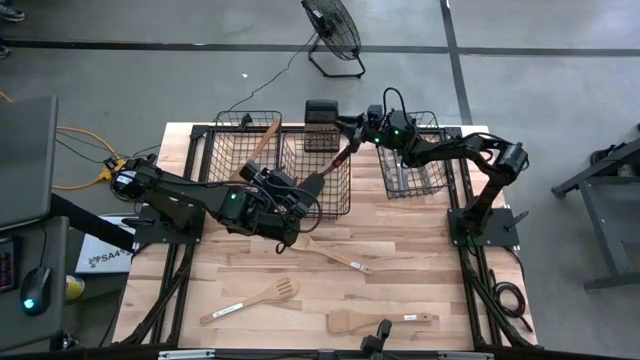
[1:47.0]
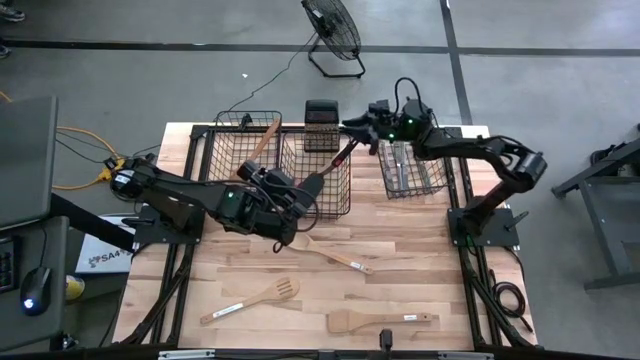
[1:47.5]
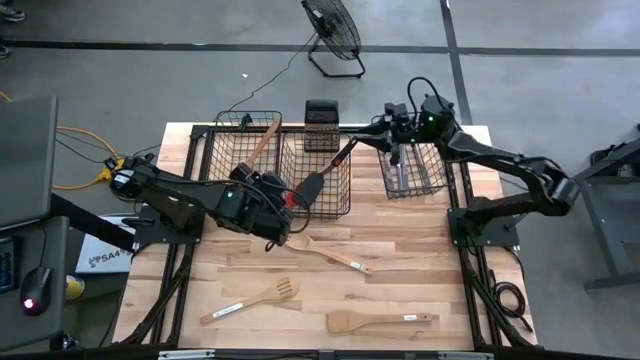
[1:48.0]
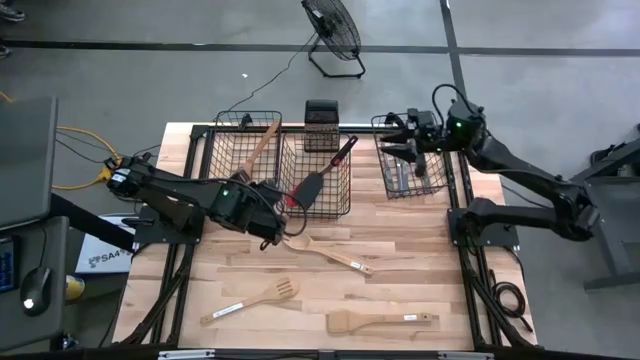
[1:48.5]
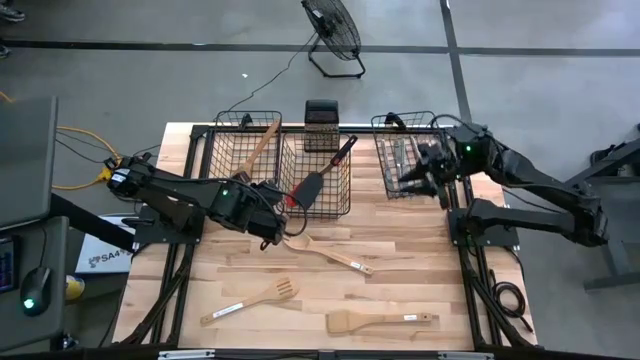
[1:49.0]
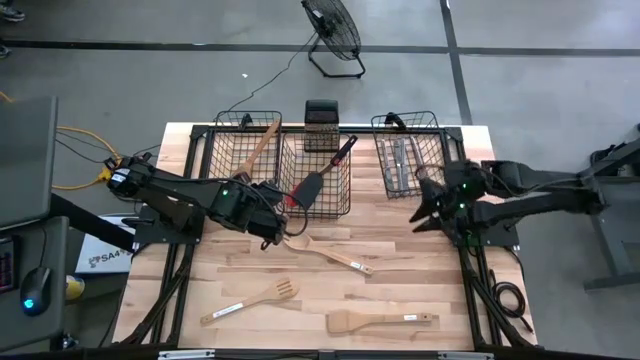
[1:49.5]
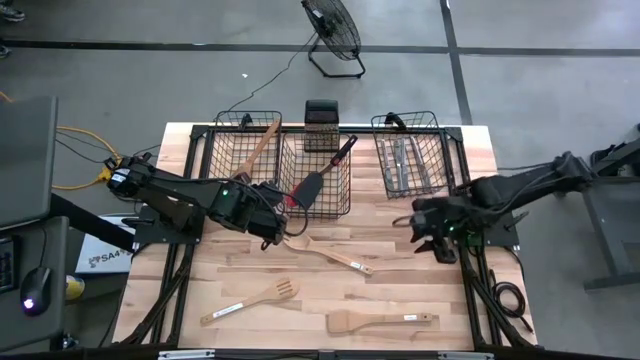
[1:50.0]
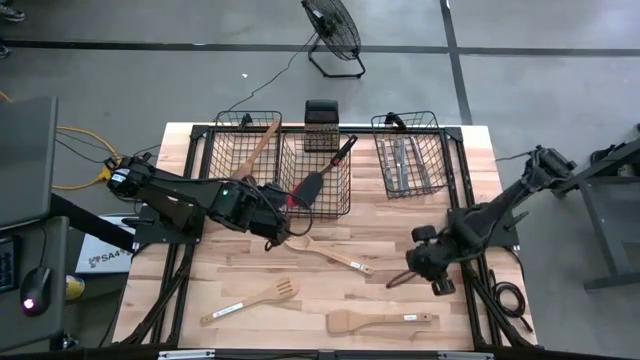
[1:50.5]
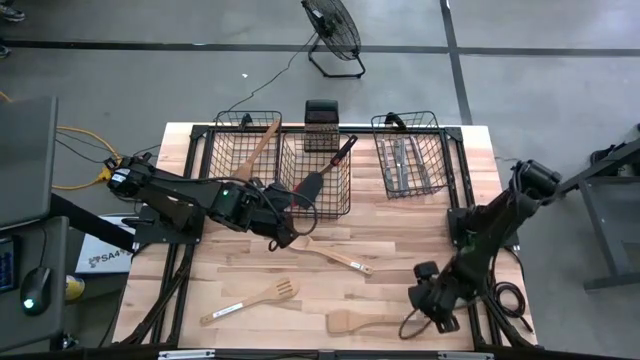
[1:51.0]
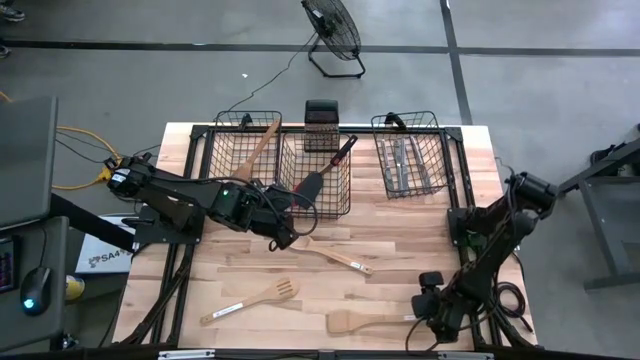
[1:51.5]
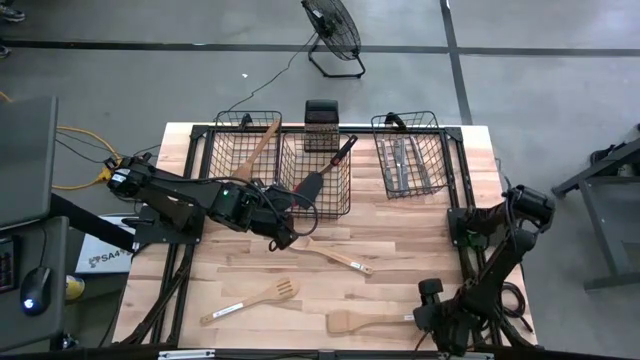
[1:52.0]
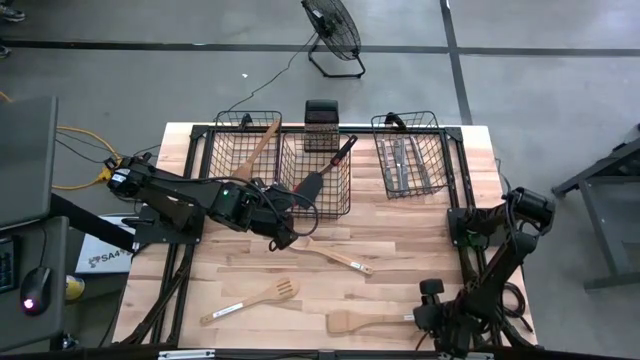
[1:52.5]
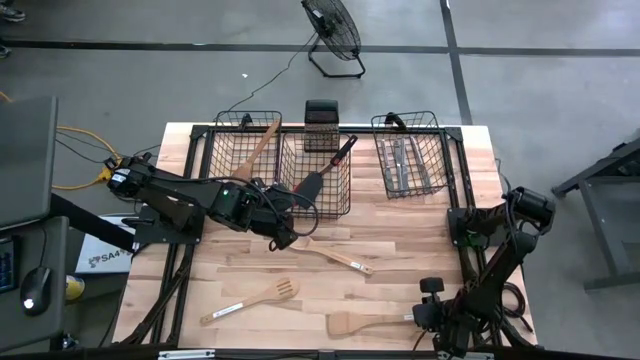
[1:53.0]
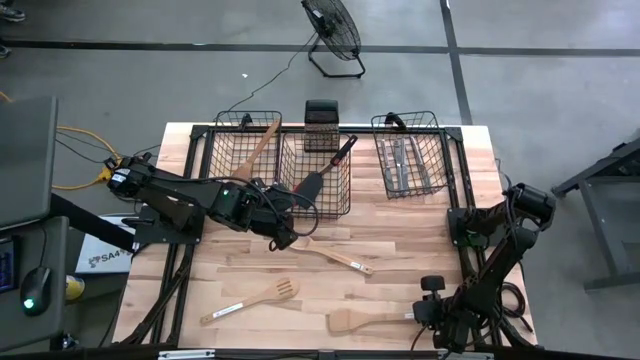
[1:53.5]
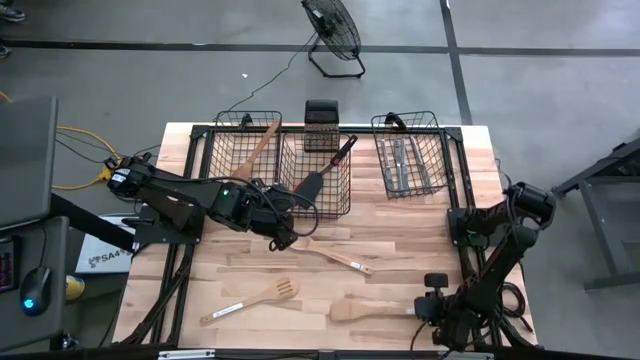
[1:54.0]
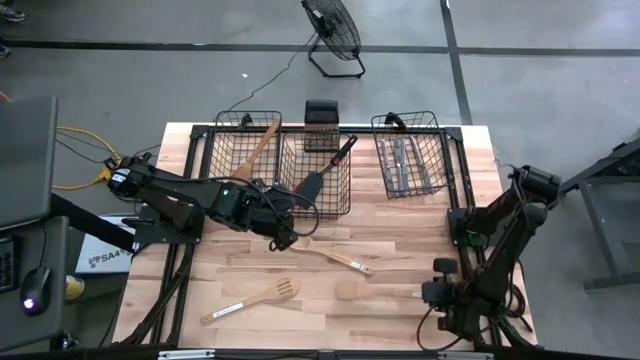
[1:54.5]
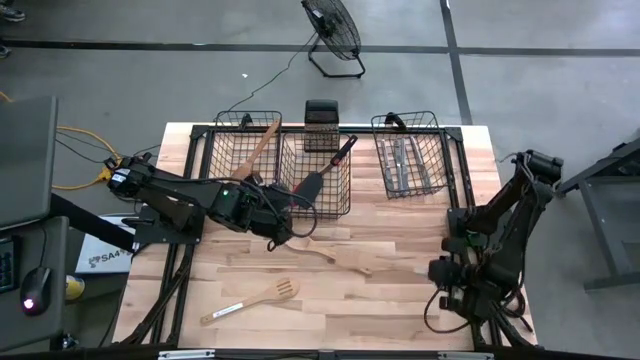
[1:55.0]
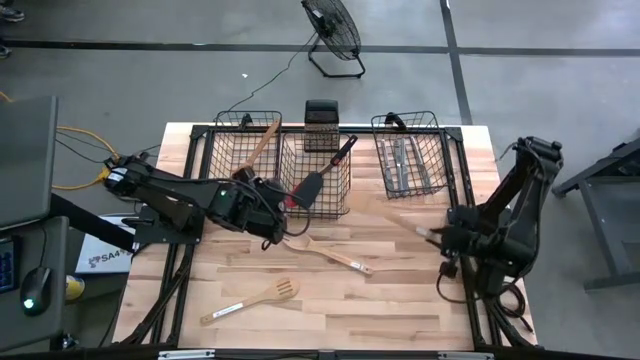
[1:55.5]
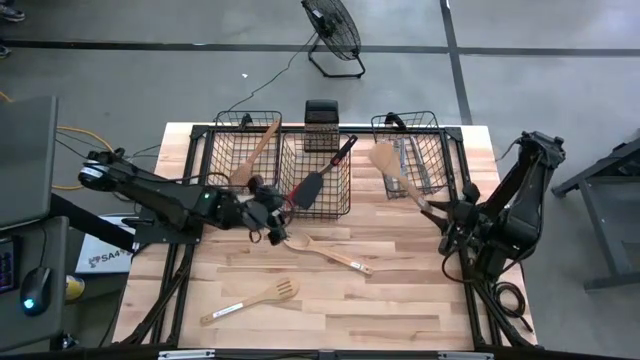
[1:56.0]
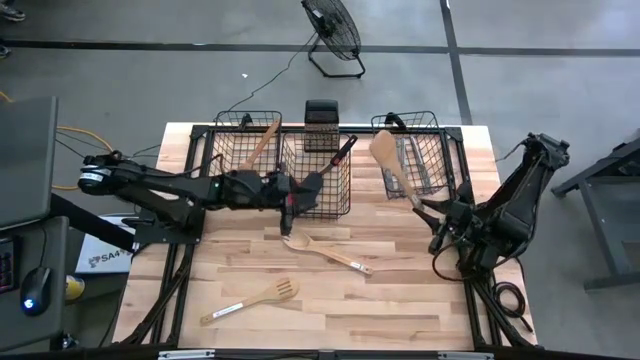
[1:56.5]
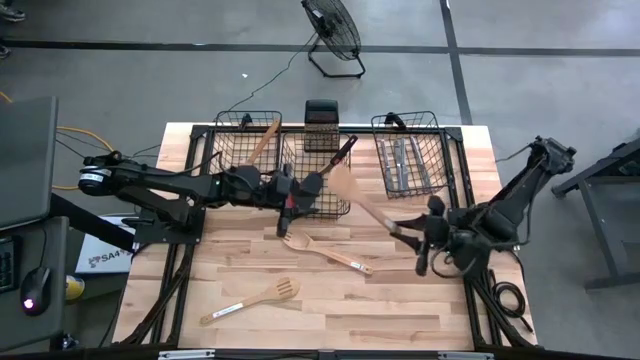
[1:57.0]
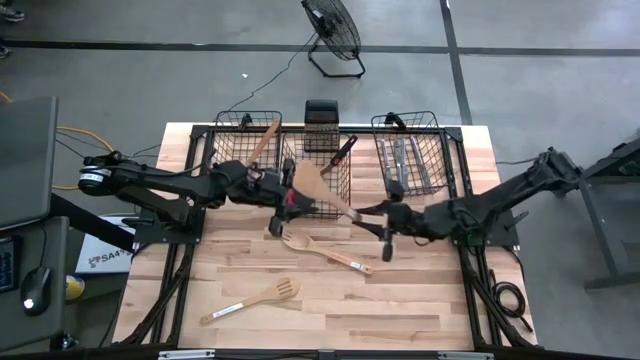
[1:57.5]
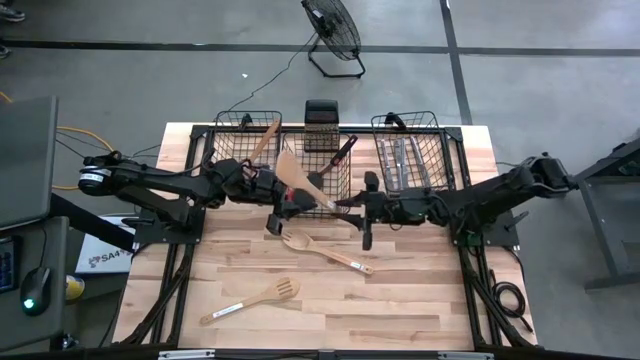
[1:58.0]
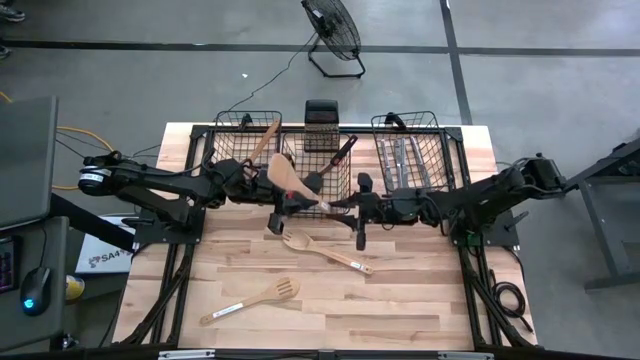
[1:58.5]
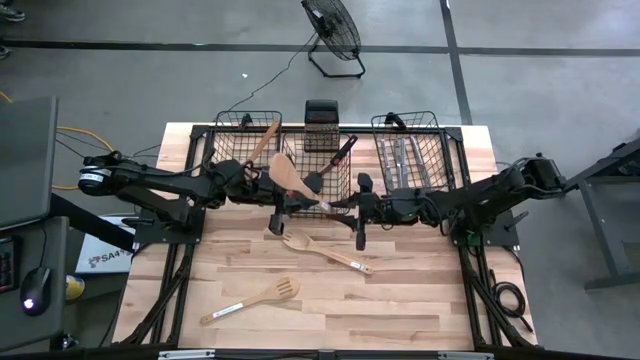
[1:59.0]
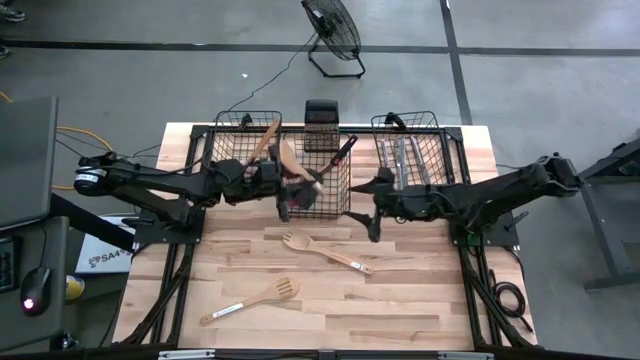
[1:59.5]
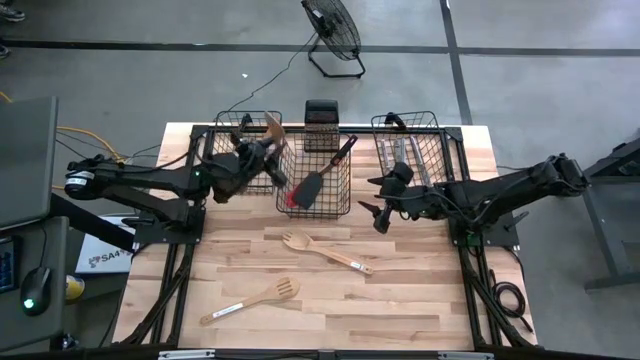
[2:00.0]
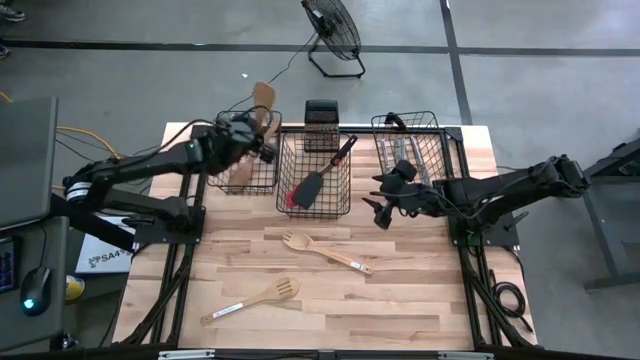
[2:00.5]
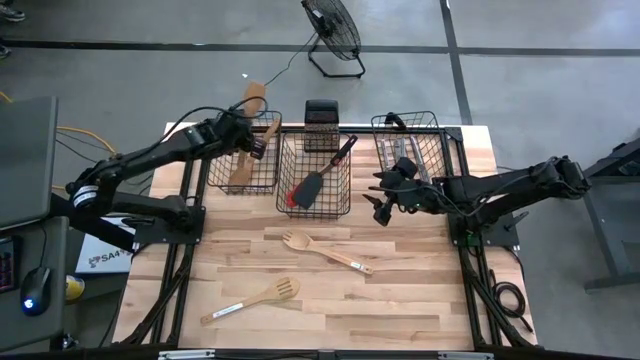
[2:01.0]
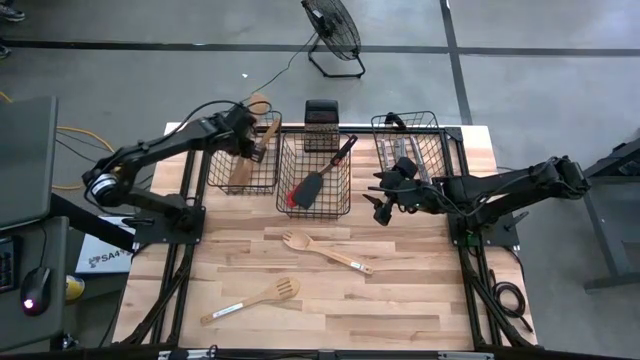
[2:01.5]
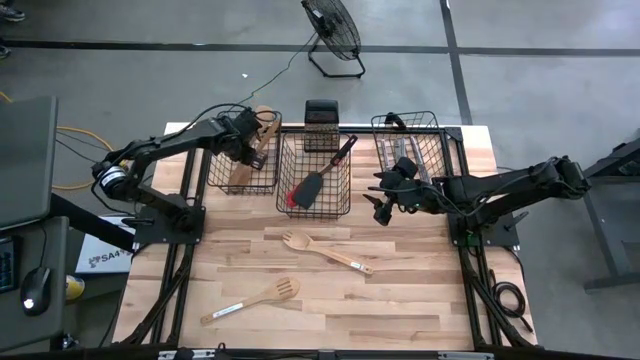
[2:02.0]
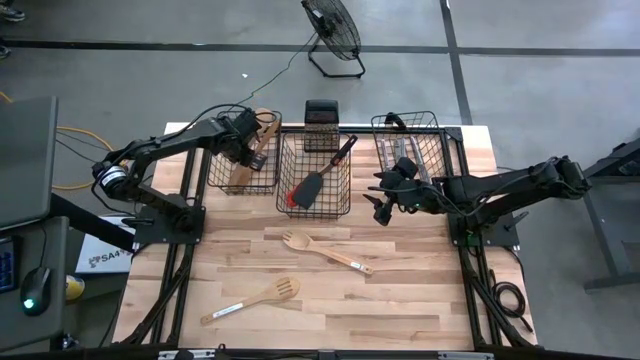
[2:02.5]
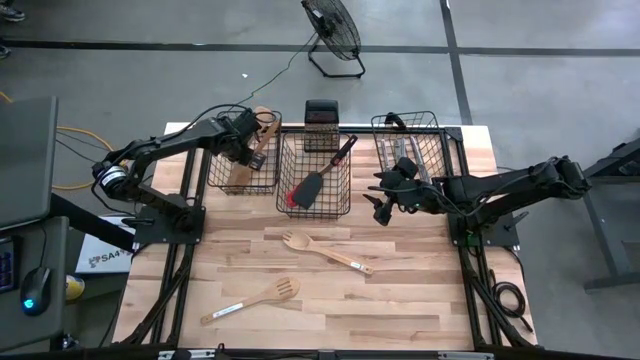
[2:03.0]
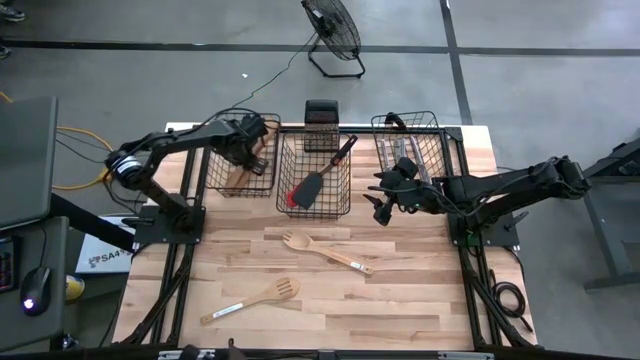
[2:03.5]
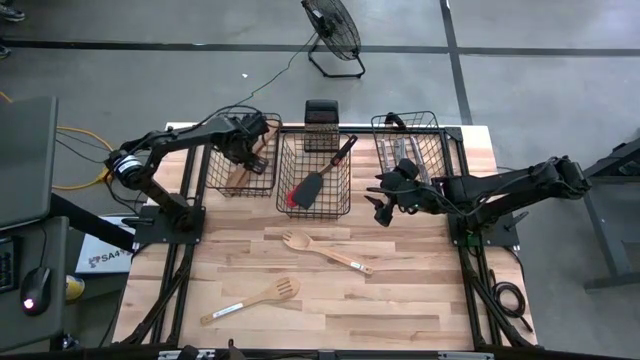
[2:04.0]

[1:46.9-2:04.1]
Task: Pick & Place Kitchen Items
Put the light brown wooden spatula into the left wire basket

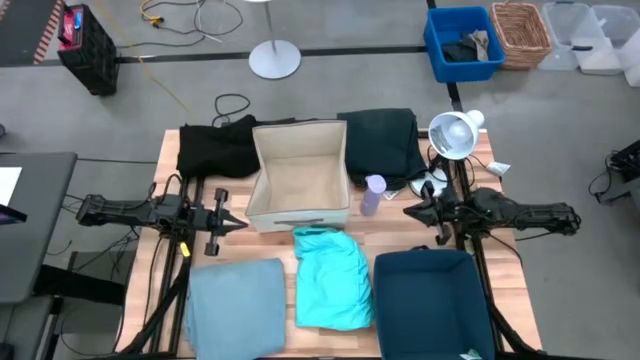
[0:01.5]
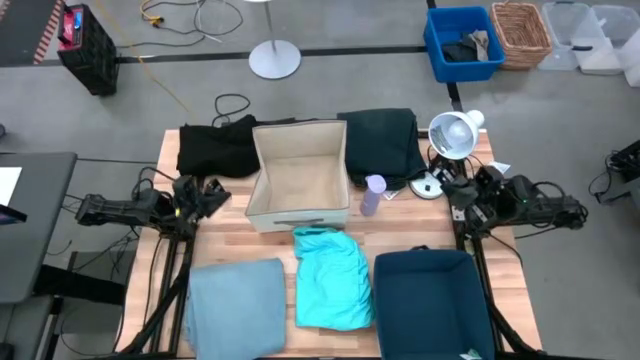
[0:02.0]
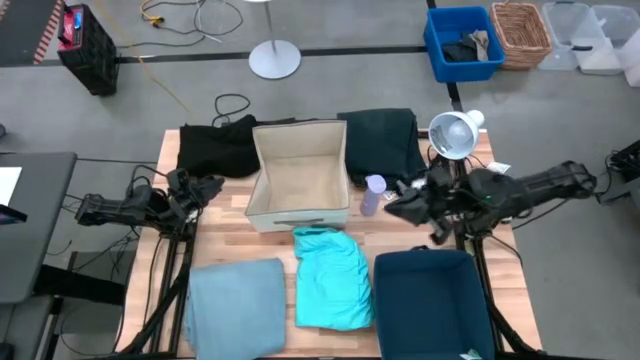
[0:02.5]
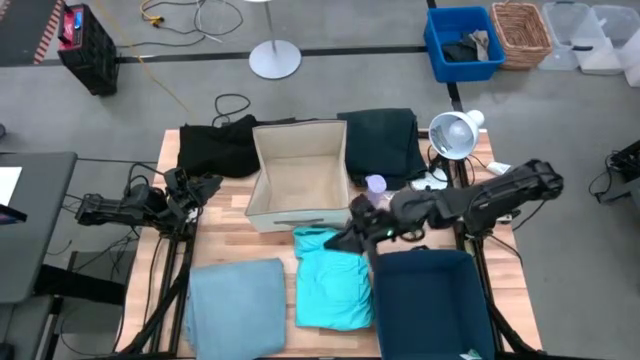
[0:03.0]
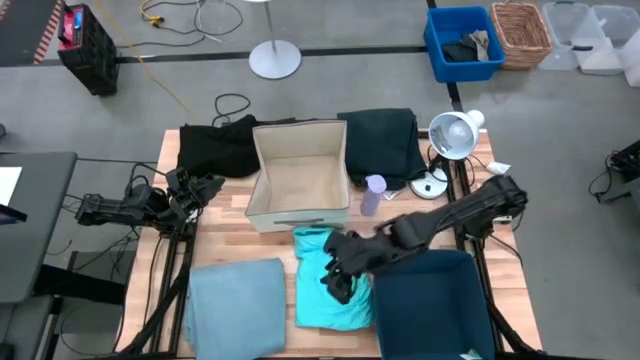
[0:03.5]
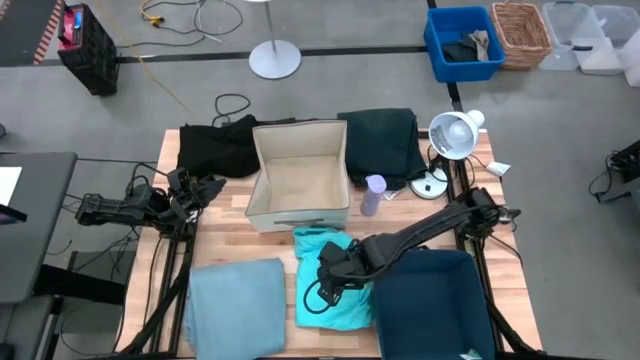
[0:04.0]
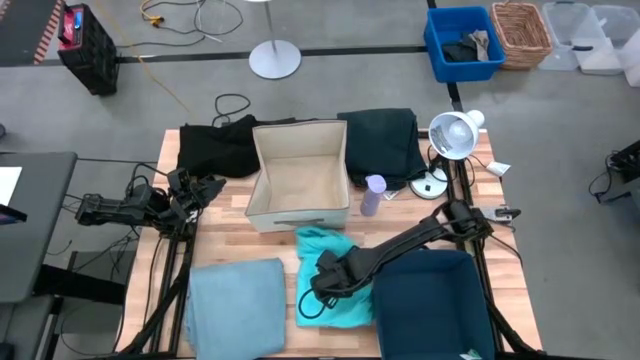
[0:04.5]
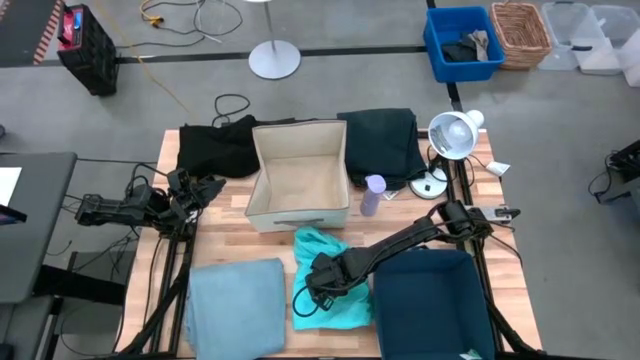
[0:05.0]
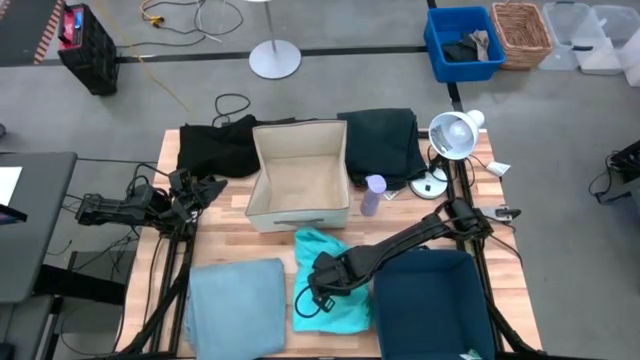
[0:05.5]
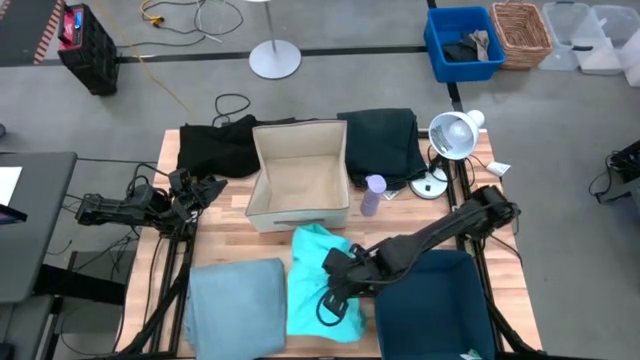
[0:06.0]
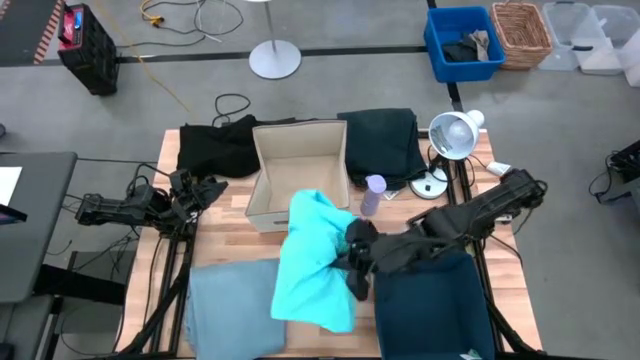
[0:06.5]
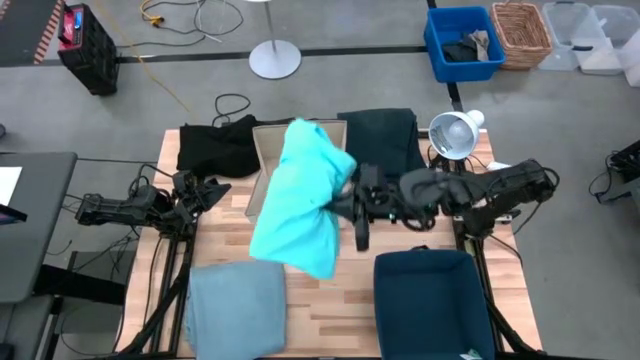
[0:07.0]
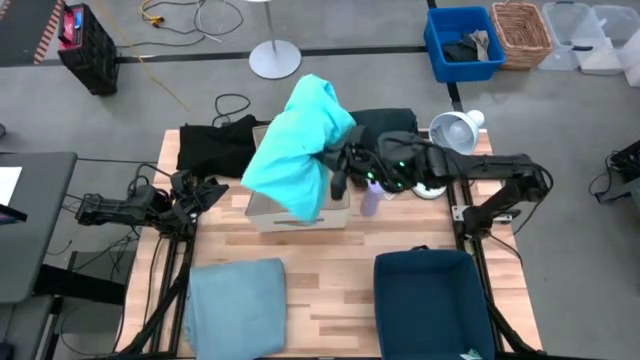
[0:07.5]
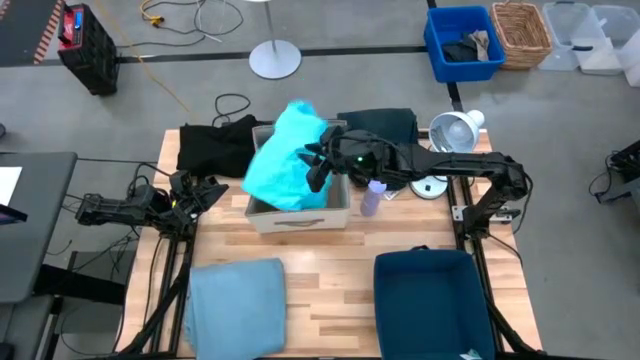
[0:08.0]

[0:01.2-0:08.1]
Task: Sort clothes
Put the blue shorts into the laundry organizer
